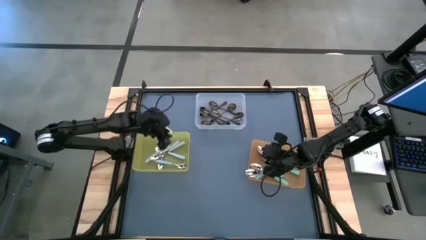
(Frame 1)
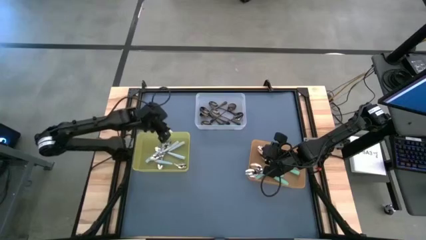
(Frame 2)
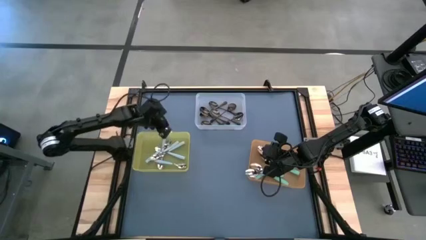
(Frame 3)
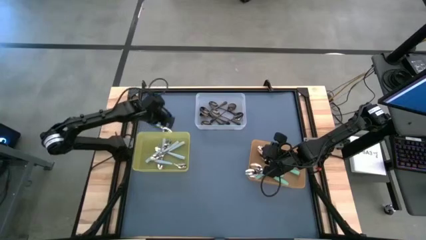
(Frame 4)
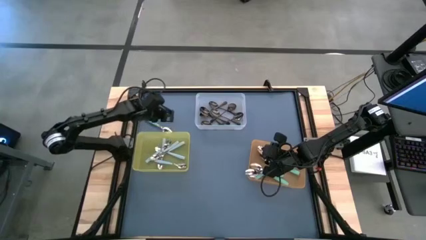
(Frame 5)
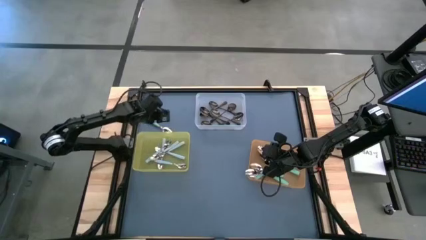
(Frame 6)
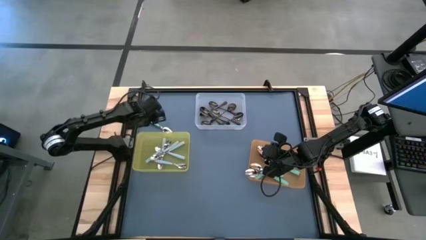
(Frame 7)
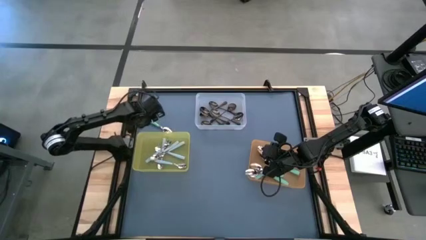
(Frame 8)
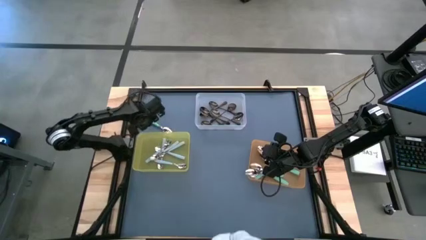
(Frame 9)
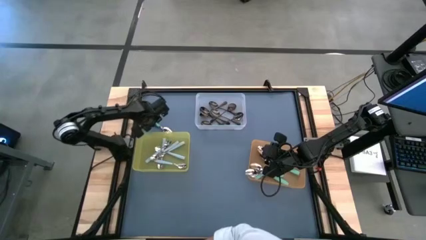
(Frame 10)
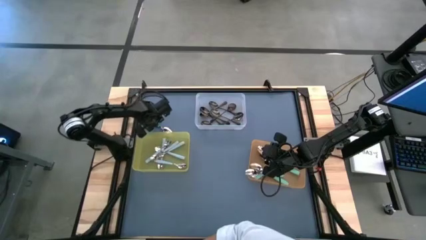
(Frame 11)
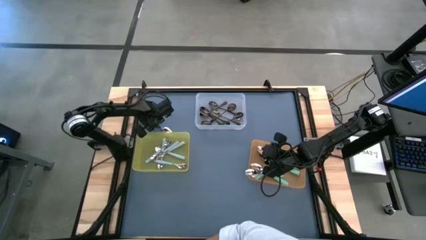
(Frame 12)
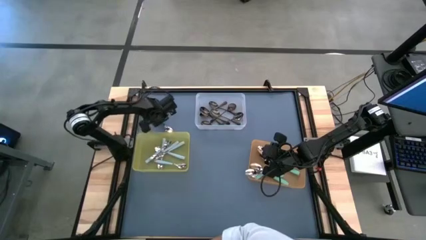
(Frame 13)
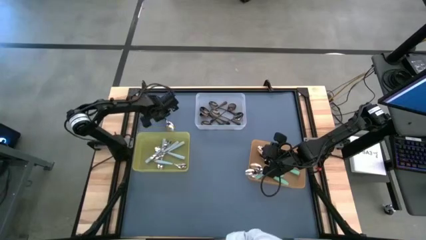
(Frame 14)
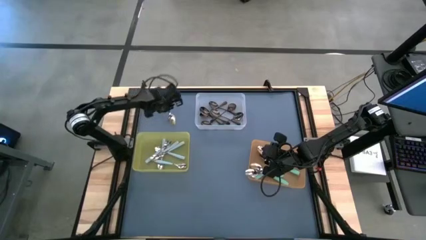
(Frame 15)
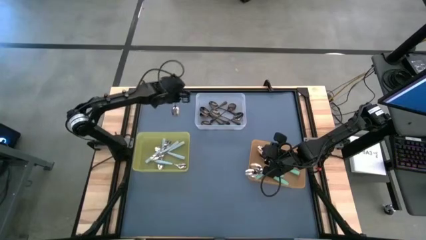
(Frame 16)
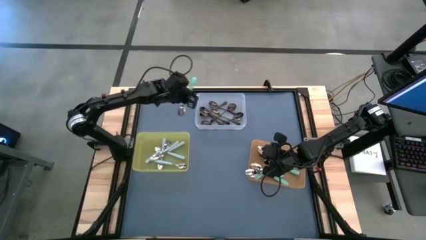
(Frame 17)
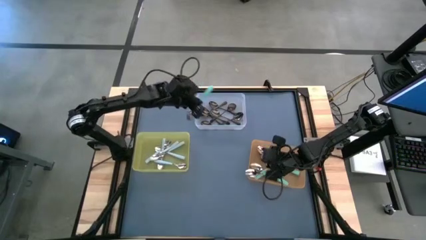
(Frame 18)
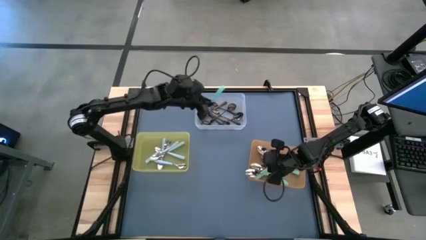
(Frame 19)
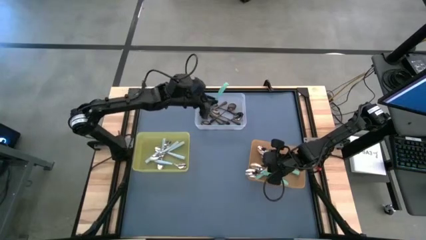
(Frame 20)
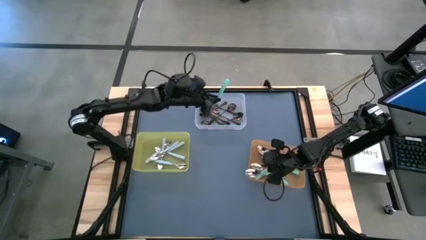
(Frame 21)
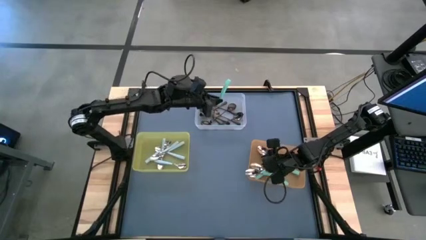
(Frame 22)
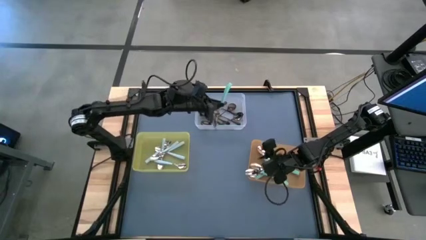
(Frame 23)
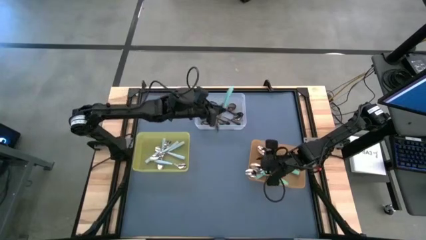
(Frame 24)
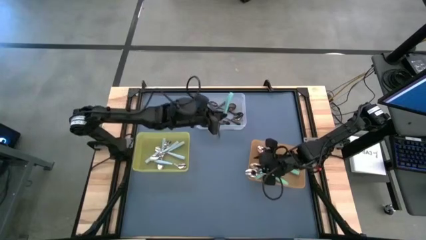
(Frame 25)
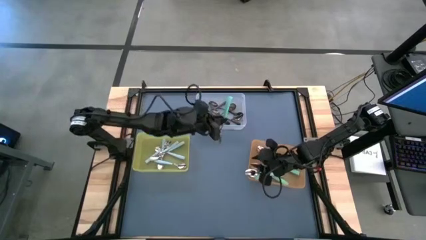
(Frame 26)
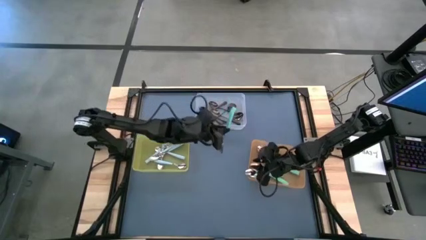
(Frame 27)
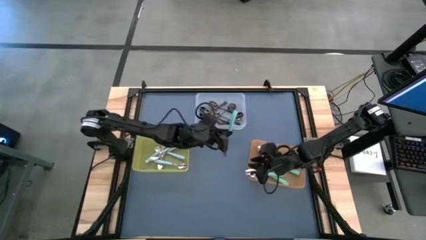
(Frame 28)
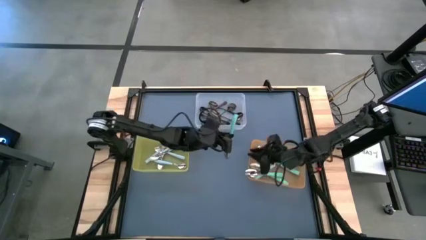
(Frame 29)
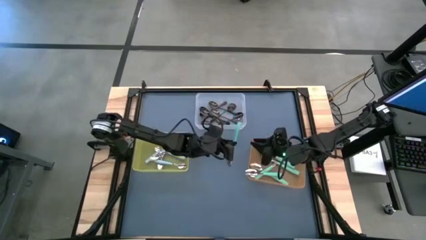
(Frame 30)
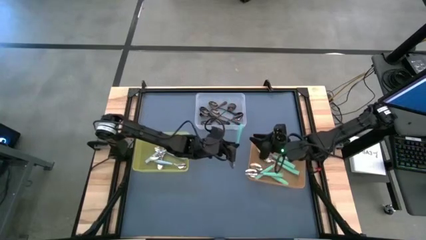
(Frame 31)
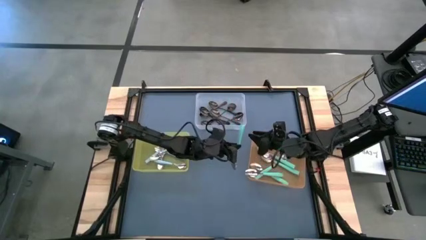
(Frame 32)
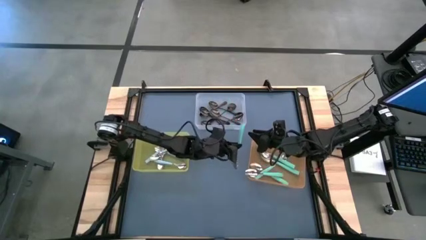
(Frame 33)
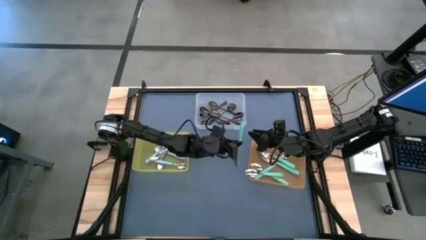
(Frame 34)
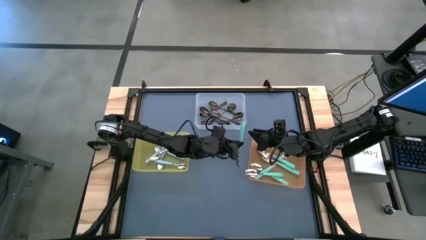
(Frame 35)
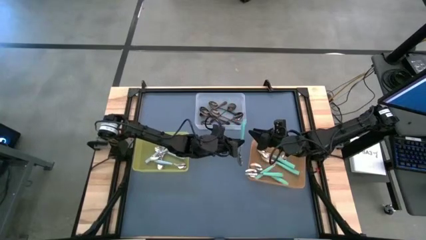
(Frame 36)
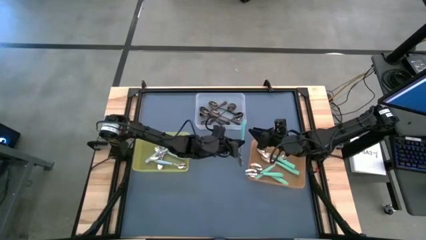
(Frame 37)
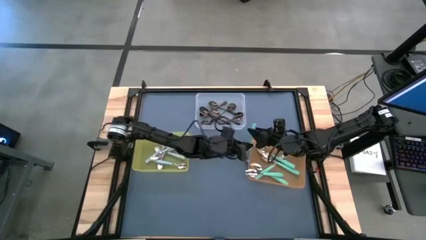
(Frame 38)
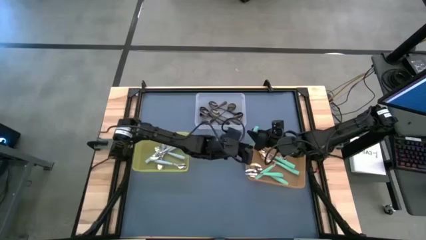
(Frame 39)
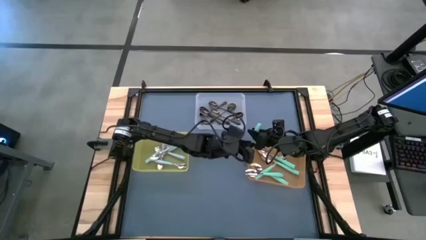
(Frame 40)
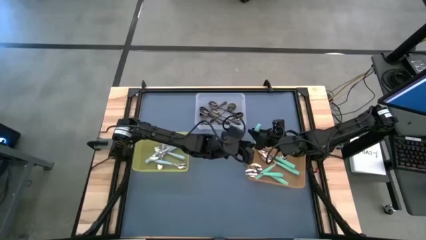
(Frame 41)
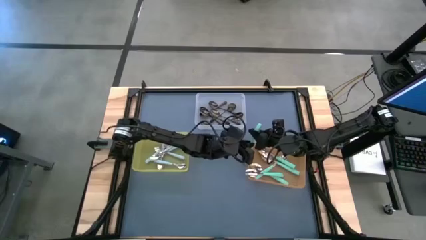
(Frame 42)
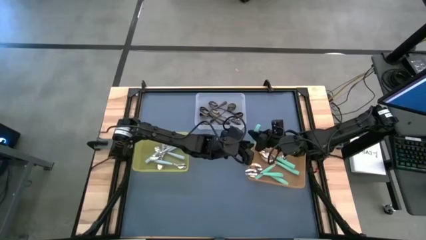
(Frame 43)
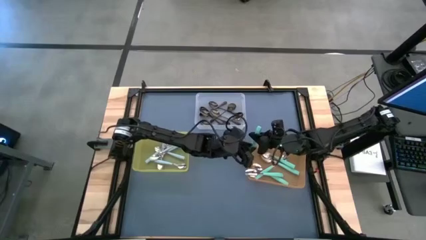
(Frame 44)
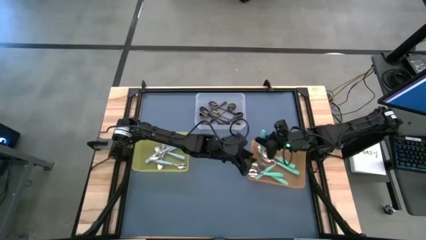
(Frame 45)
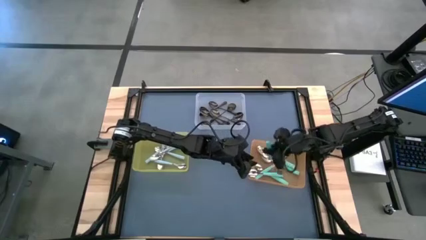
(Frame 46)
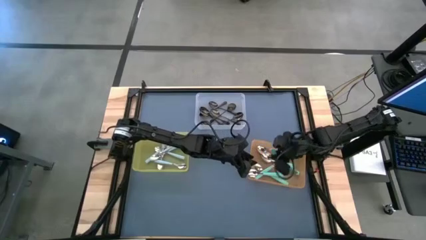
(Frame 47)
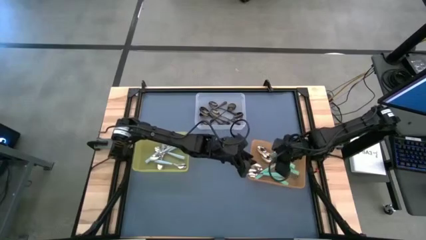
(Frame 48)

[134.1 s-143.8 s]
Task: Sort silverware by color (type)
Put the green spoon into the orange bin

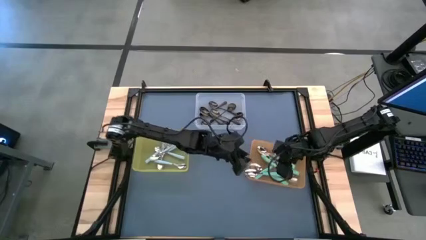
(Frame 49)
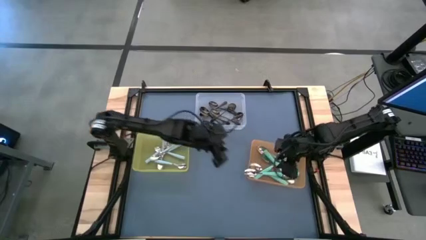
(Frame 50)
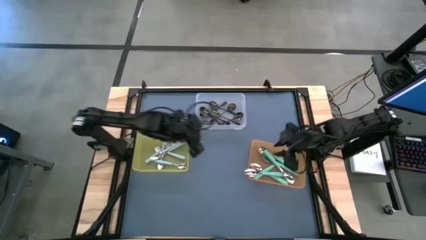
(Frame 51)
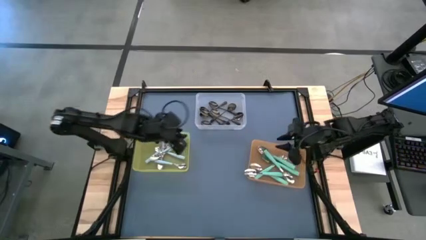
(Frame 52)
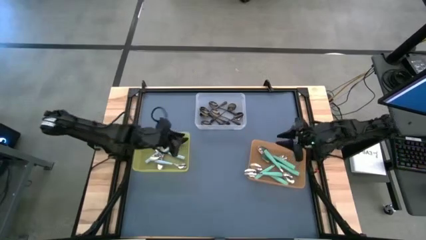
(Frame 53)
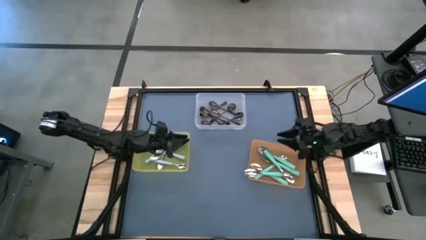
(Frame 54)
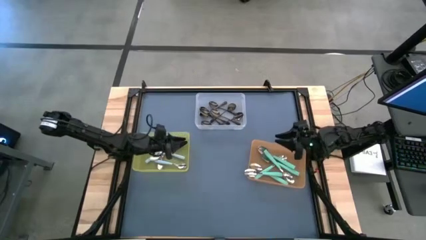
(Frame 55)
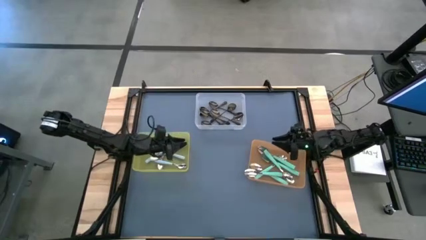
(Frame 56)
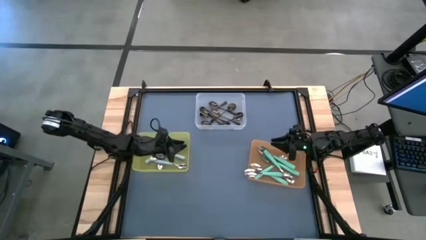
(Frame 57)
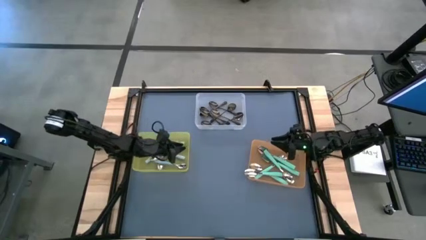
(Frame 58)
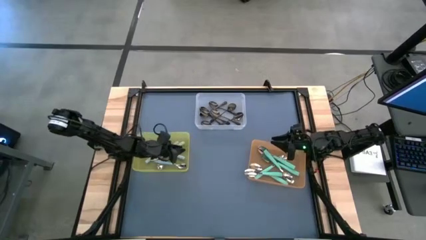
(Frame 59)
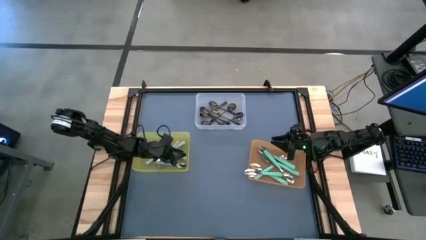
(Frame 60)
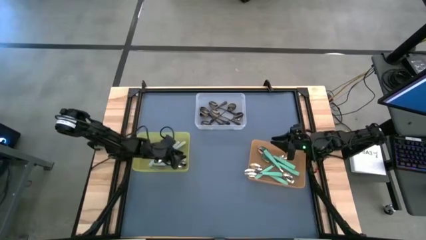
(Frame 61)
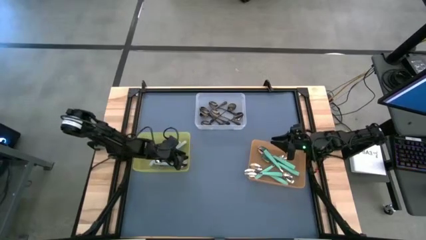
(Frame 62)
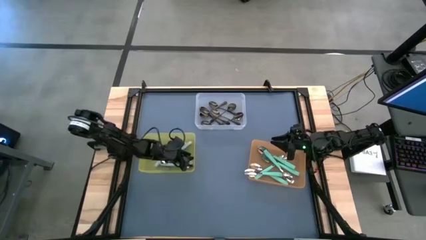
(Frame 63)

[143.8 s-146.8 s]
Adjust the yellow bin on the table
